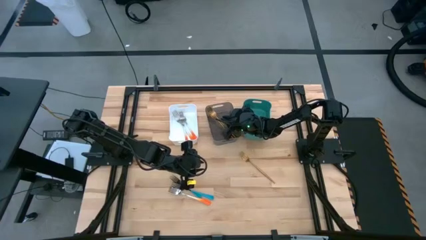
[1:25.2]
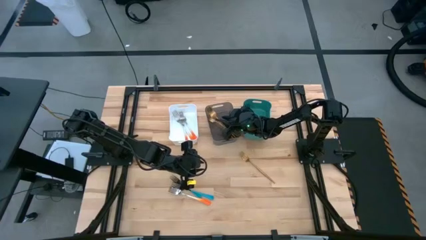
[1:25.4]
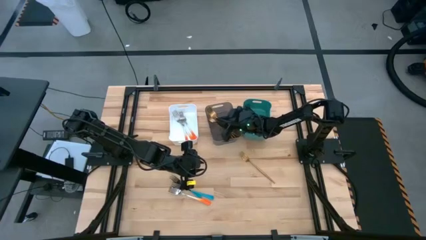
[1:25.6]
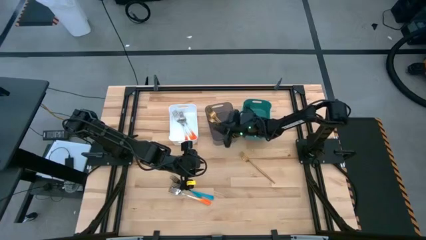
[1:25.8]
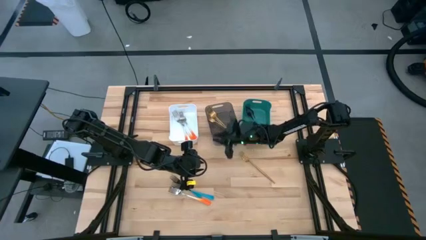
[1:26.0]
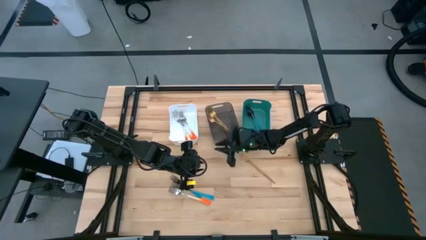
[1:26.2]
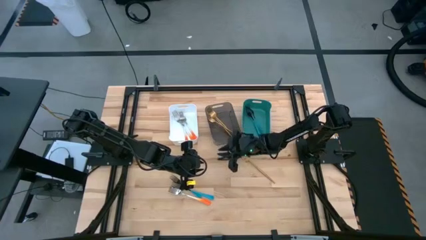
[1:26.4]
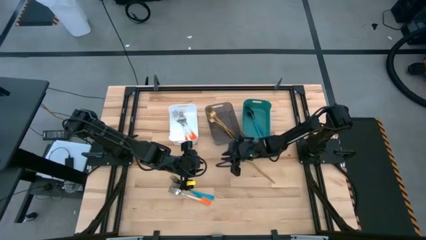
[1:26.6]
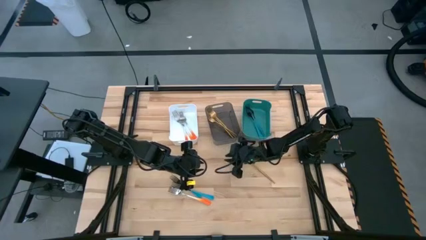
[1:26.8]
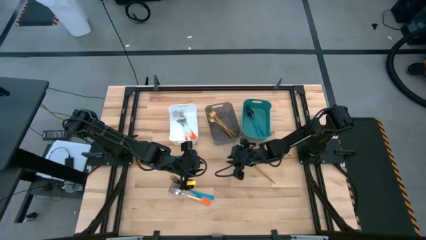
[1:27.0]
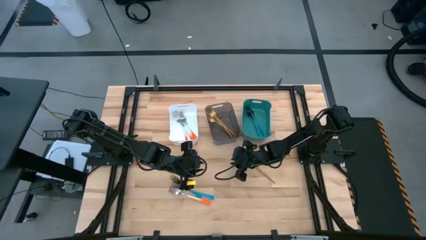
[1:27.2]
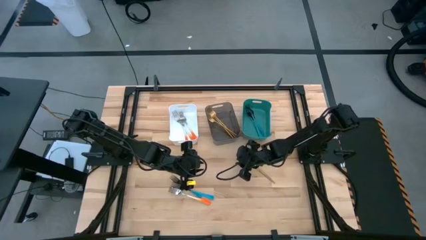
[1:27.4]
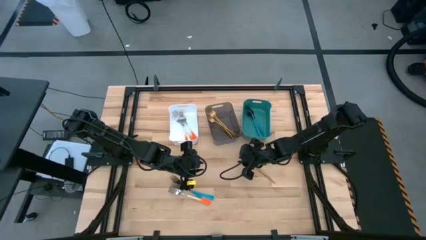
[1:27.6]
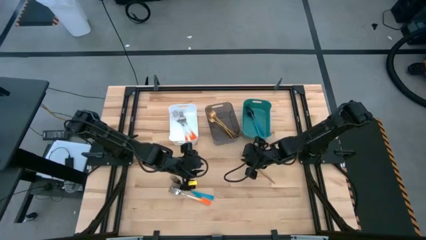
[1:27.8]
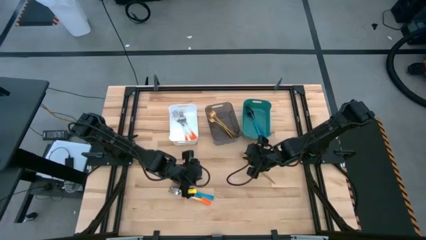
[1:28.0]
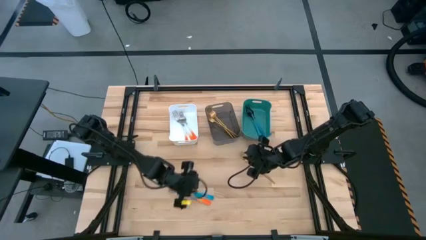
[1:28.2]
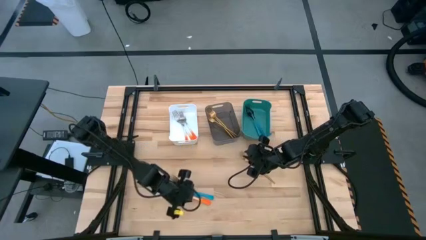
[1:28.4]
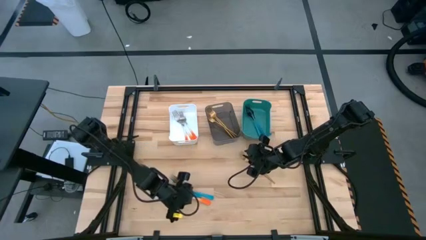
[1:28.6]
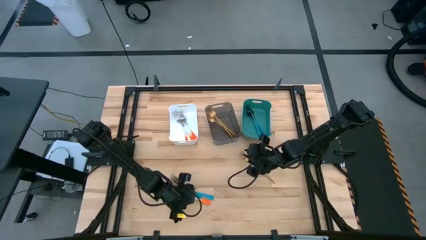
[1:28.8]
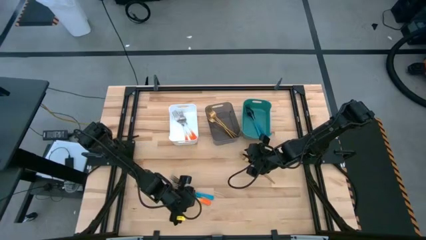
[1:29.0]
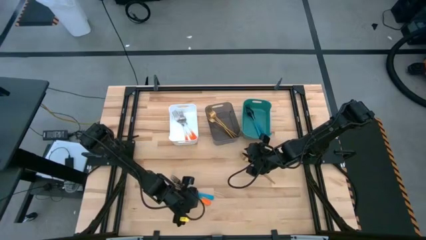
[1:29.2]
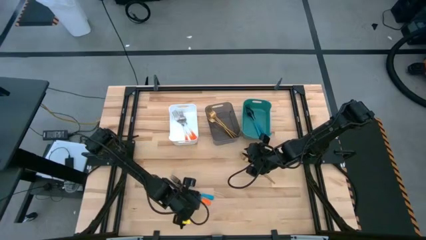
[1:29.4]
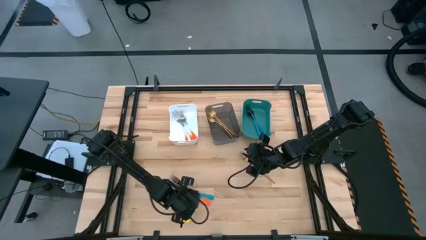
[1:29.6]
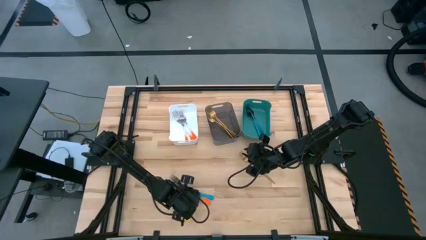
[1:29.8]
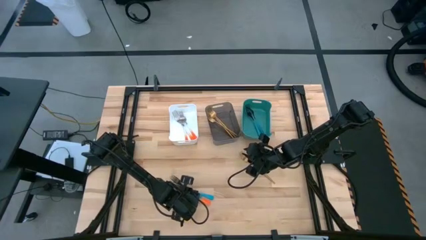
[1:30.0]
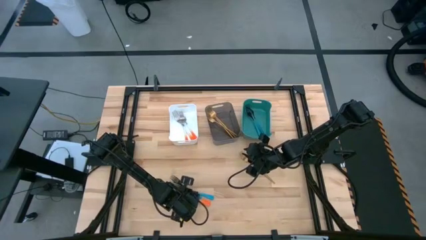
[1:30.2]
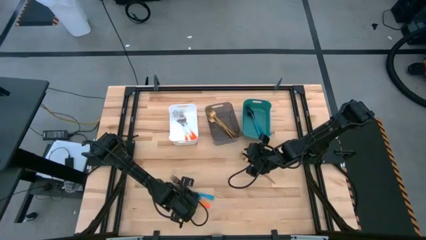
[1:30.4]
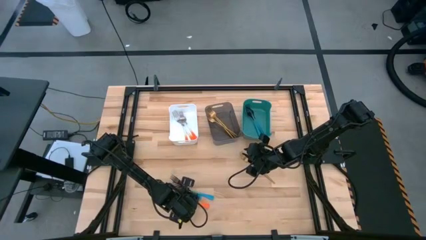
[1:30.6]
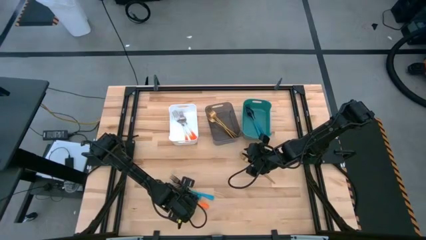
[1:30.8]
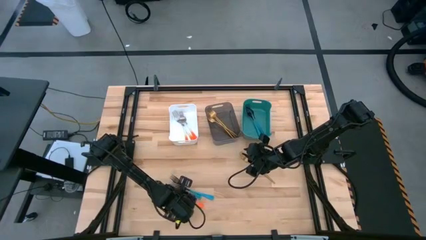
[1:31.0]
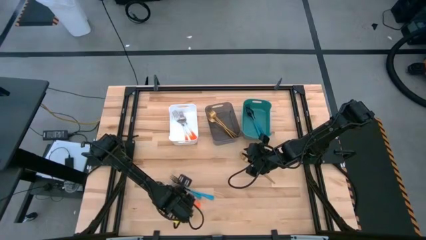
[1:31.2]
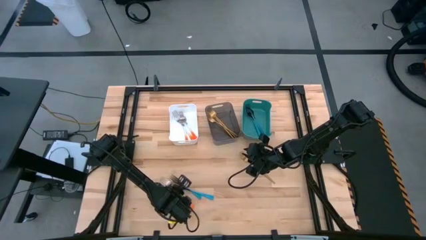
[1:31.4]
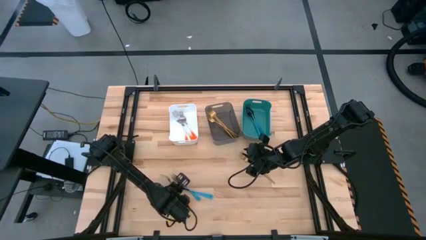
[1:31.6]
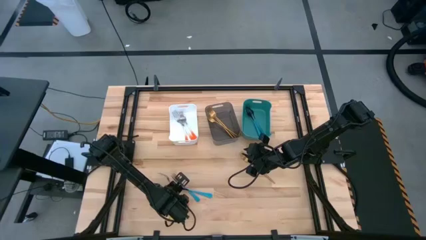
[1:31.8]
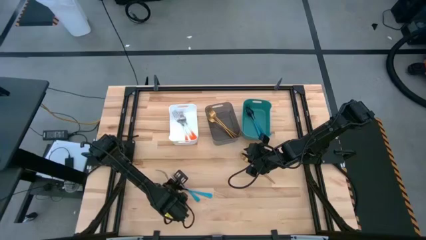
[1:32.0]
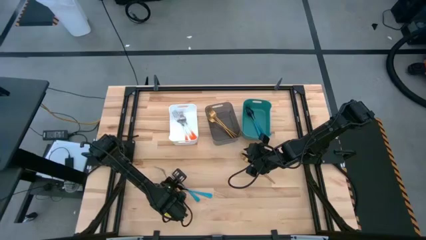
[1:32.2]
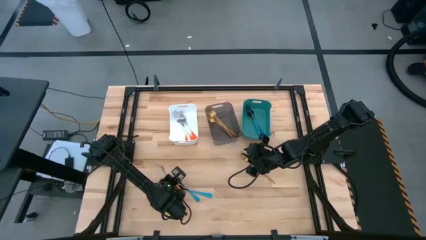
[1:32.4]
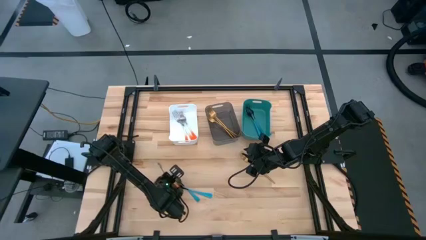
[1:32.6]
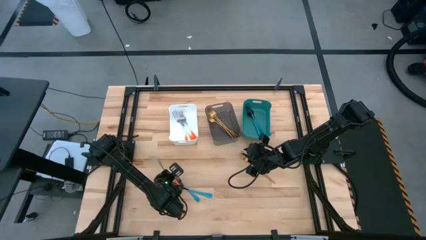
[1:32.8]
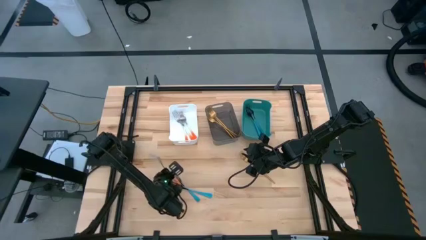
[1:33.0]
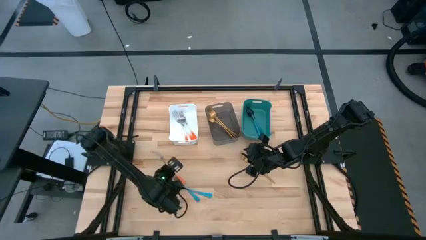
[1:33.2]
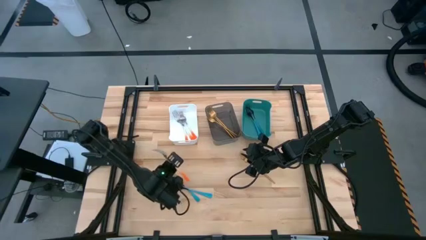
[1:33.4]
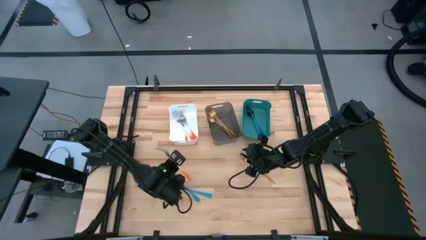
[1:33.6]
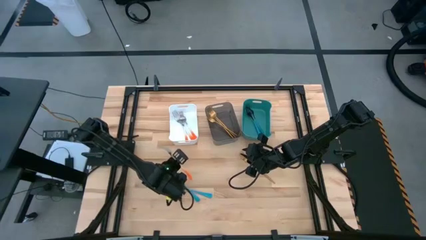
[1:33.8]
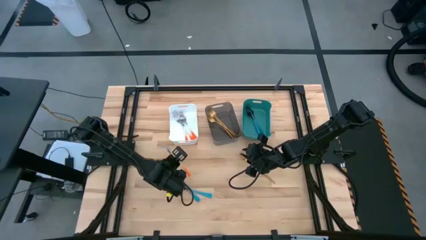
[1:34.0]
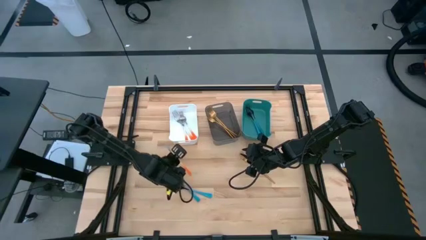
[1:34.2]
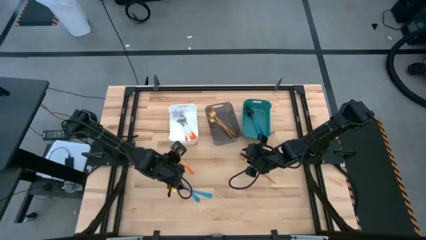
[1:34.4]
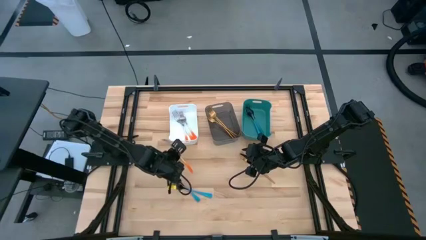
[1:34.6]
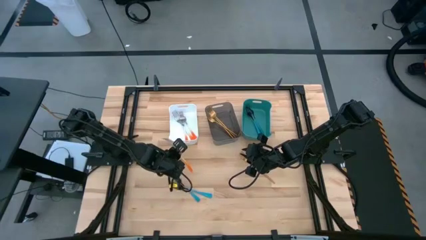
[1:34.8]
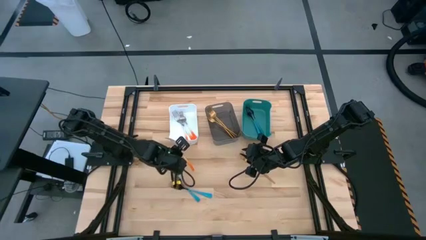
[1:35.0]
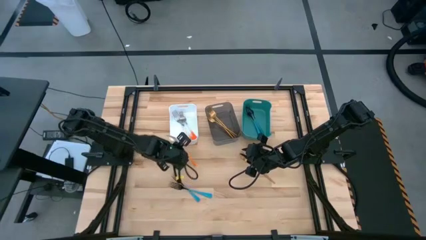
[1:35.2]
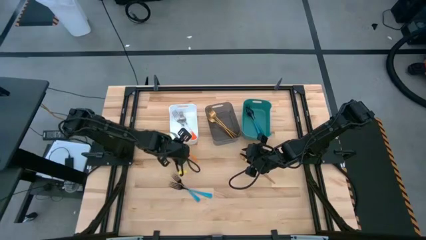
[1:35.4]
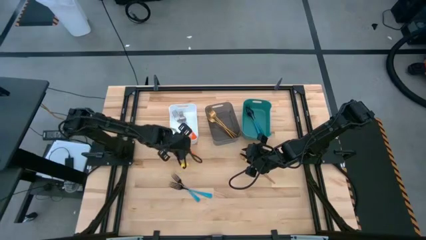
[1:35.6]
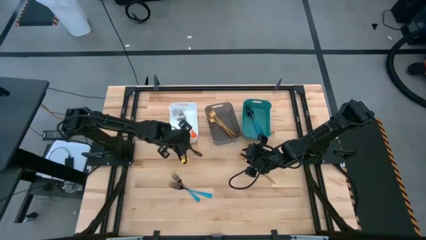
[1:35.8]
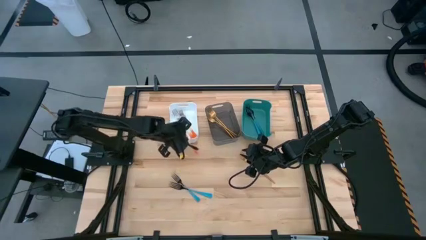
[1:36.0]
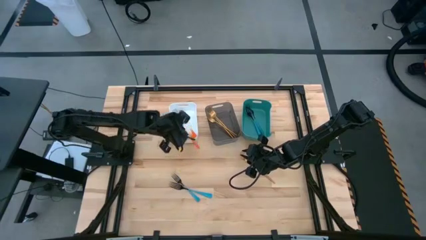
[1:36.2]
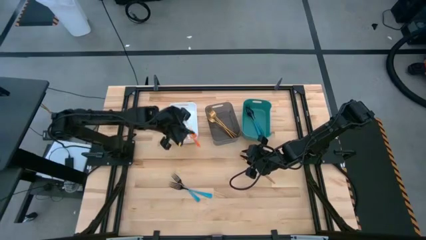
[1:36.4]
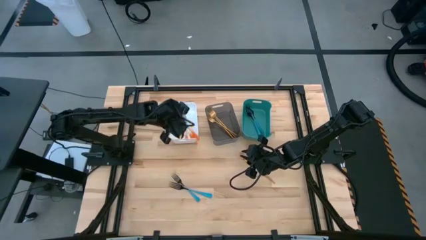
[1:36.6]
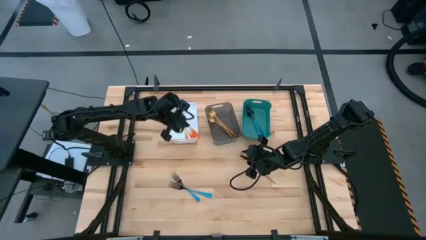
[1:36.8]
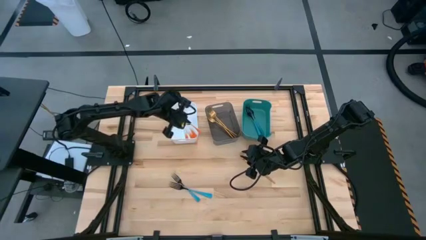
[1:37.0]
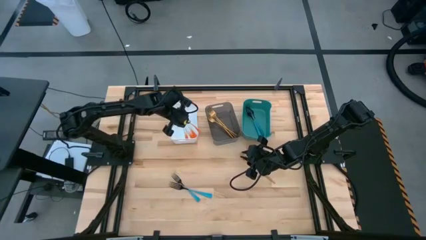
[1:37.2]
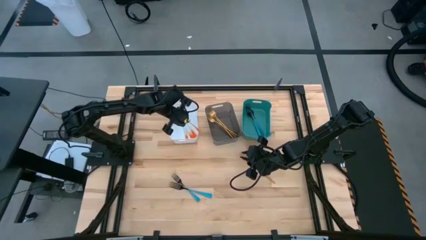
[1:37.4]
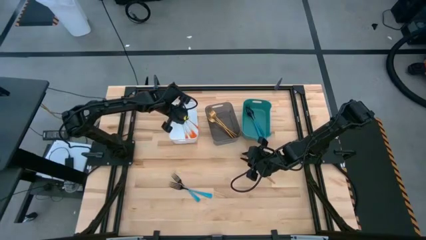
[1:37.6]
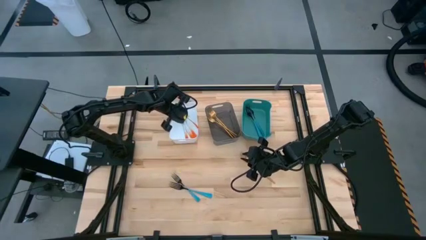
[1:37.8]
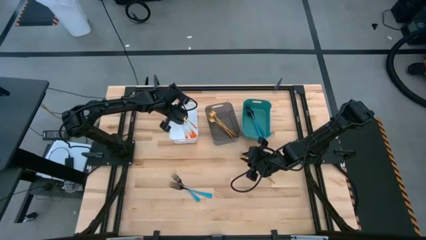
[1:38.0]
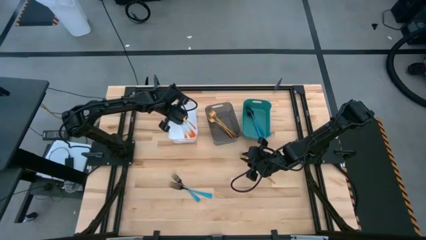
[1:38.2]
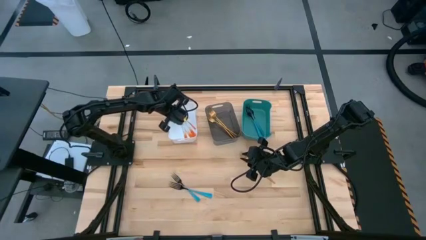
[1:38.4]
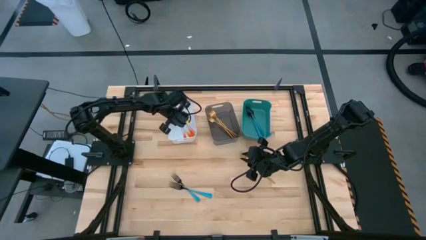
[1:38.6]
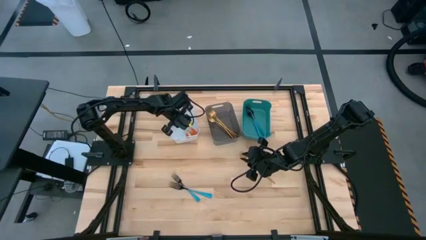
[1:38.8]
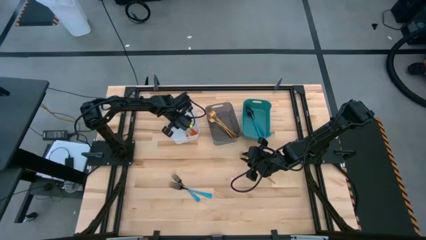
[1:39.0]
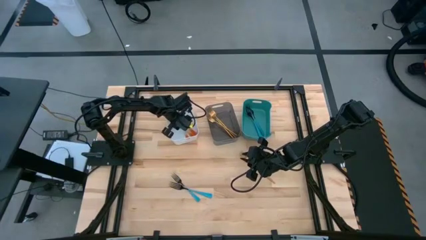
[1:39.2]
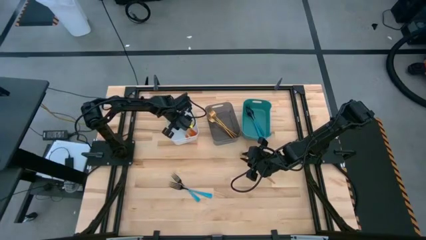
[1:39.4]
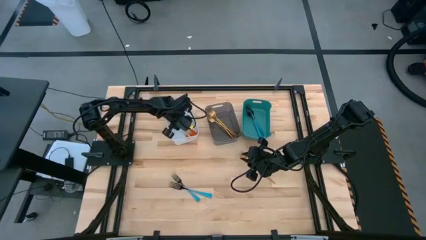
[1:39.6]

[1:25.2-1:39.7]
Task: Sort silverware by color (type)
Put the orange fork into the white bin
